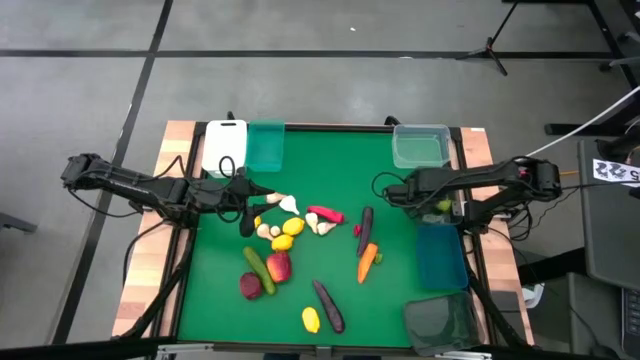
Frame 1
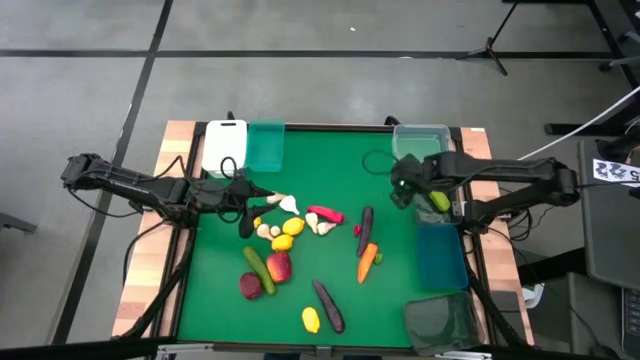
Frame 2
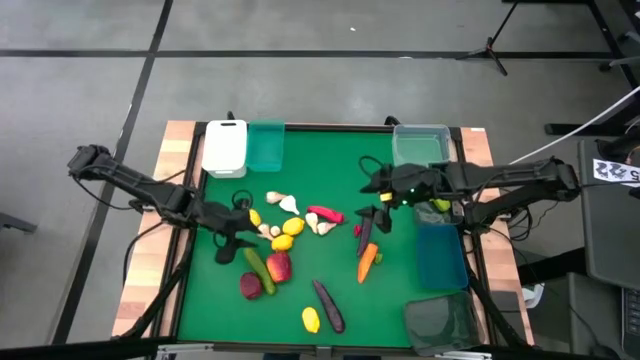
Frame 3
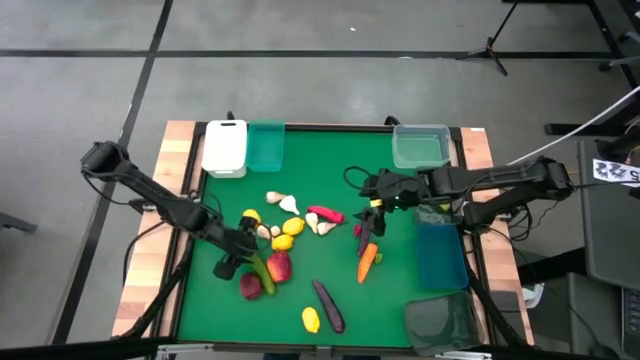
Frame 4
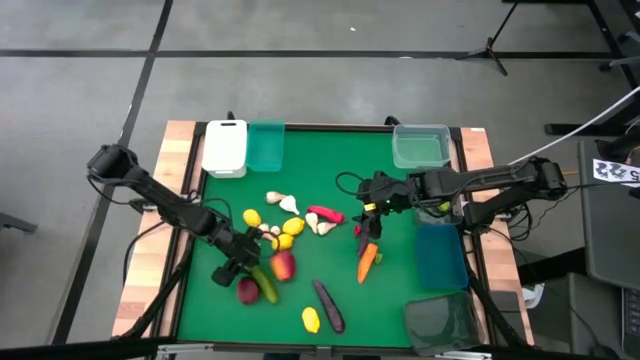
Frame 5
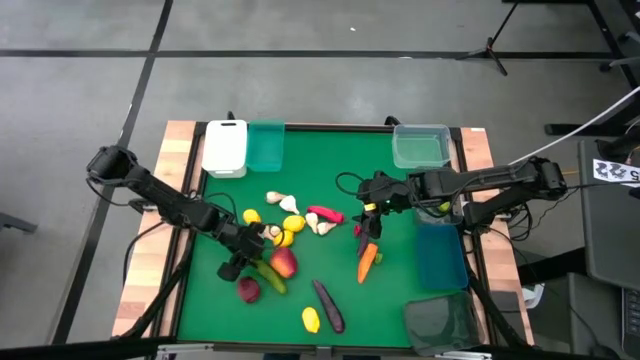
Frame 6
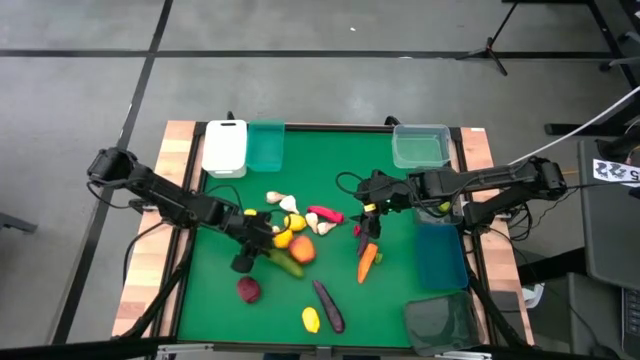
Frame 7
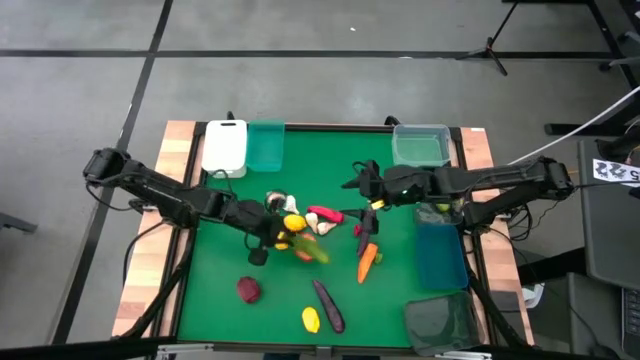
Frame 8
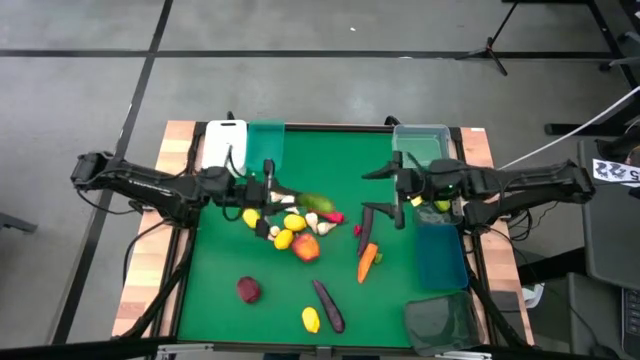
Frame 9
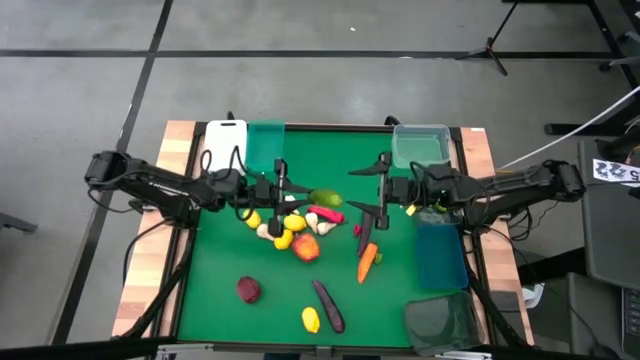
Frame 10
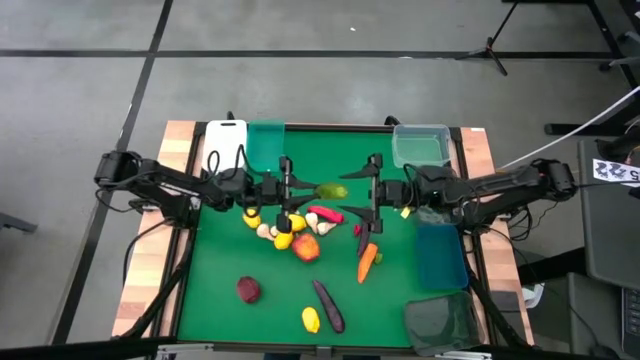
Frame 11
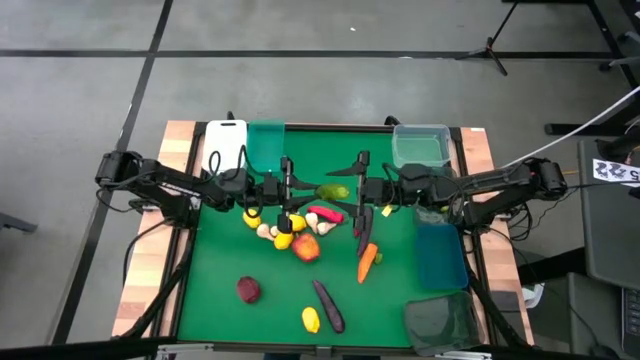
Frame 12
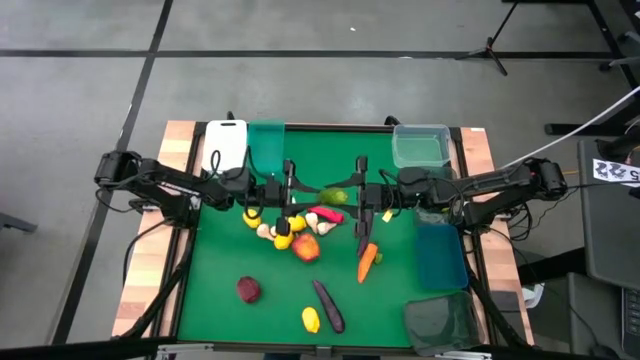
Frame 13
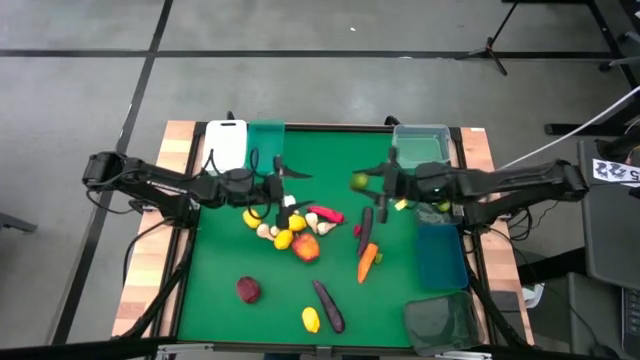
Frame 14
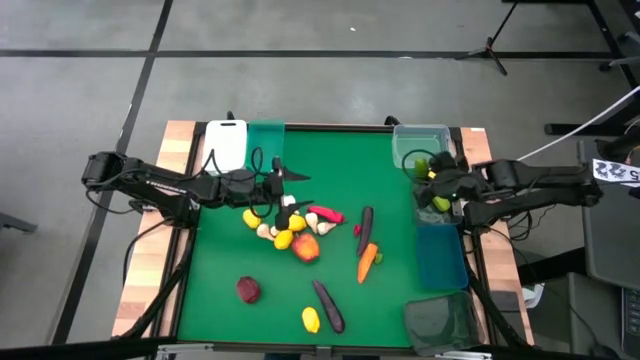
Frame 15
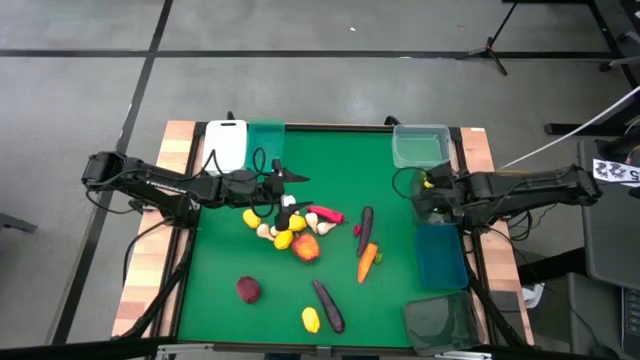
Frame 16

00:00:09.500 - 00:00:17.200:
Task: Sort produce into baskets
Put the green cucumber into the top black transparent bin

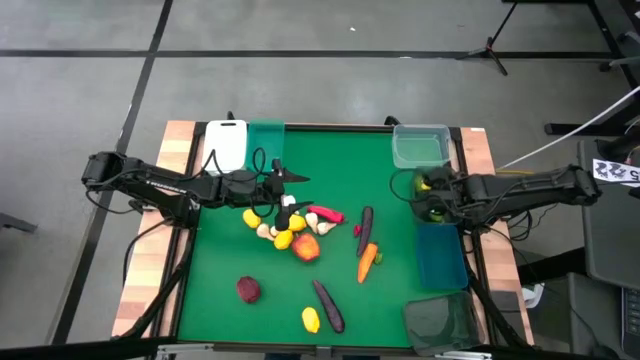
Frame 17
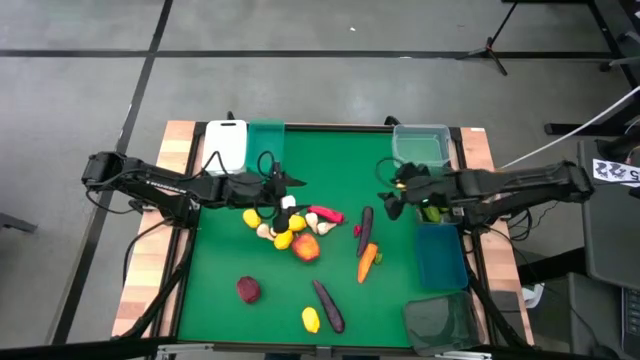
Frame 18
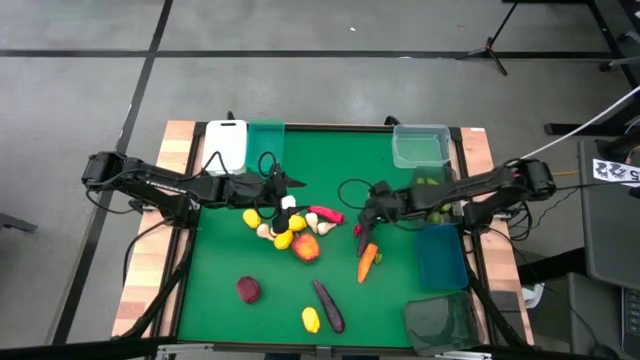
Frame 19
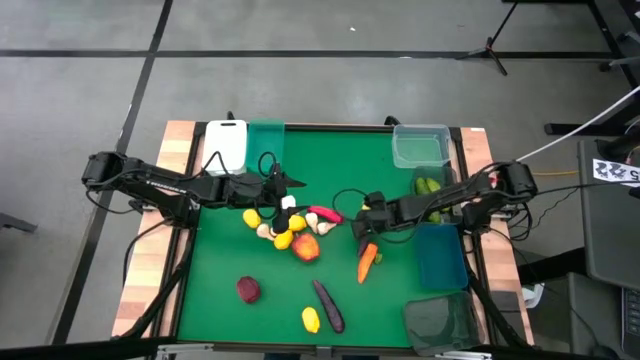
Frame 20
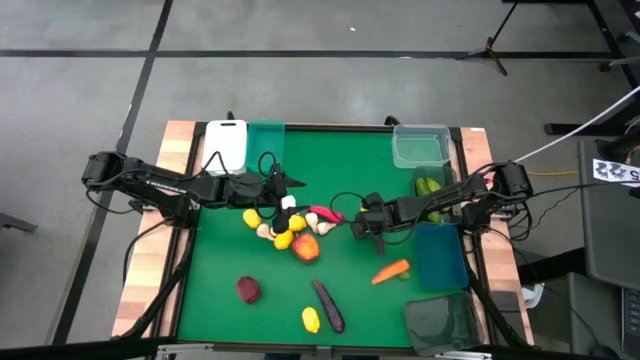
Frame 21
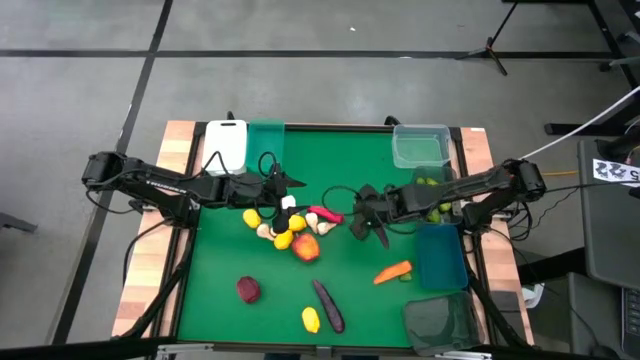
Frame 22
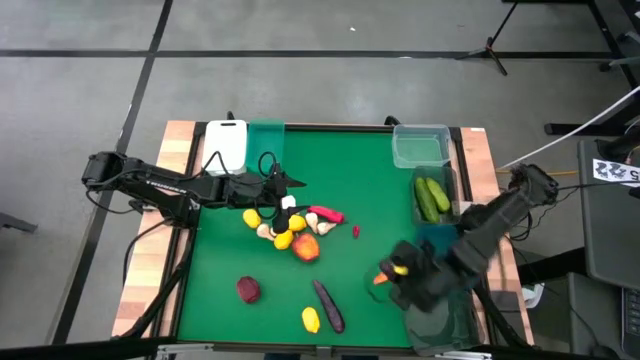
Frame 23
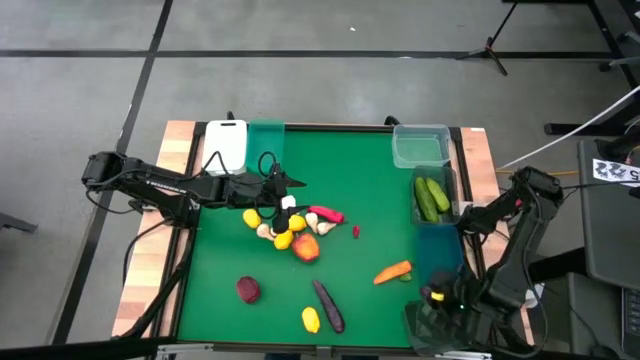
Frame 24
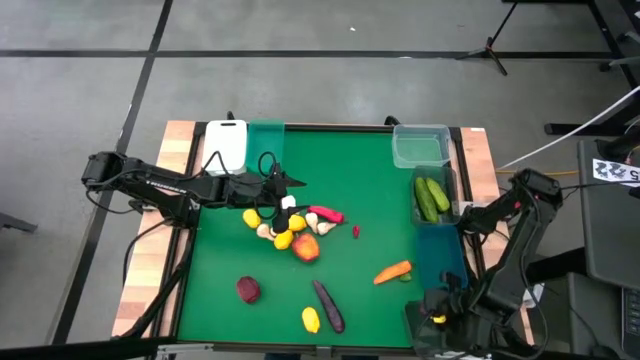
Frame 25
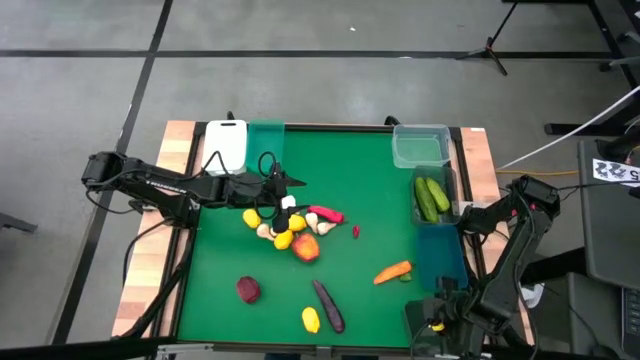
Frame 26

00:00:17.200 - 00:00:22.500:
Put the purple eggplant into the black transparent bin

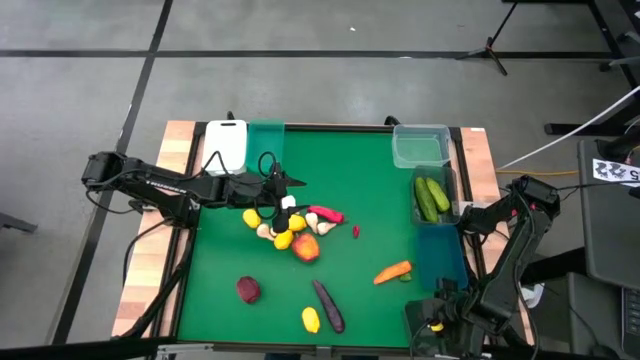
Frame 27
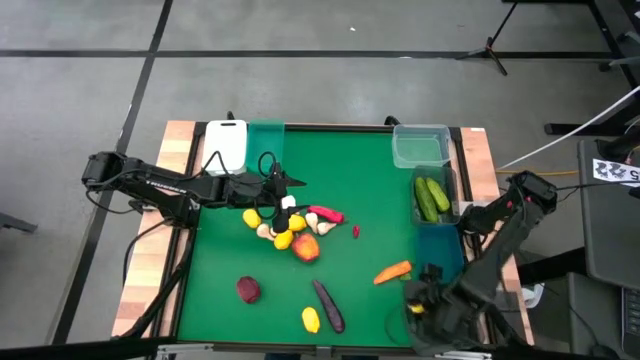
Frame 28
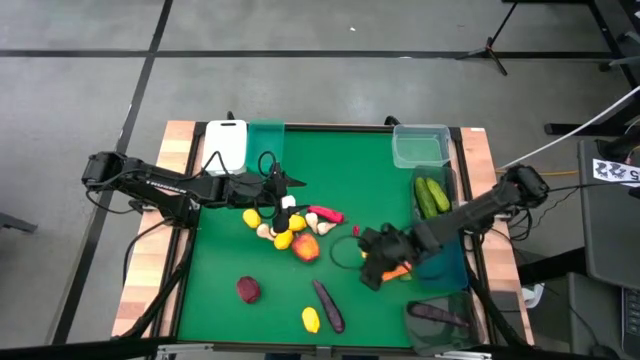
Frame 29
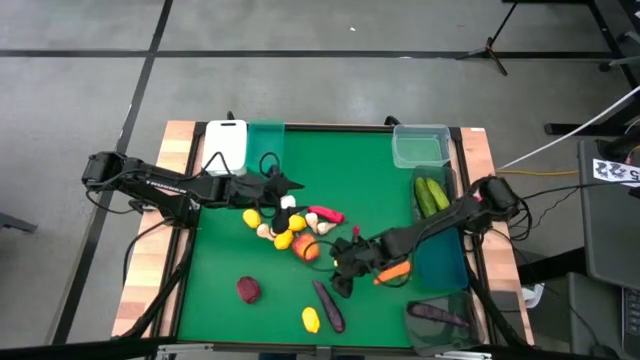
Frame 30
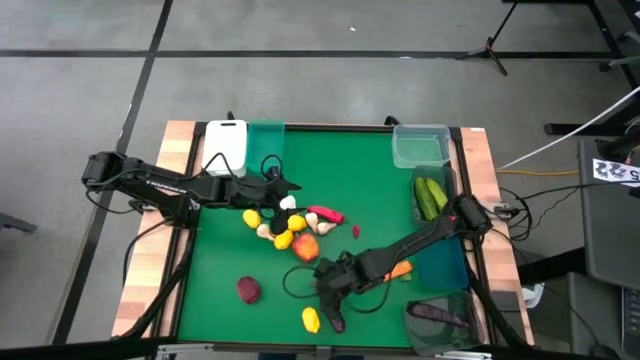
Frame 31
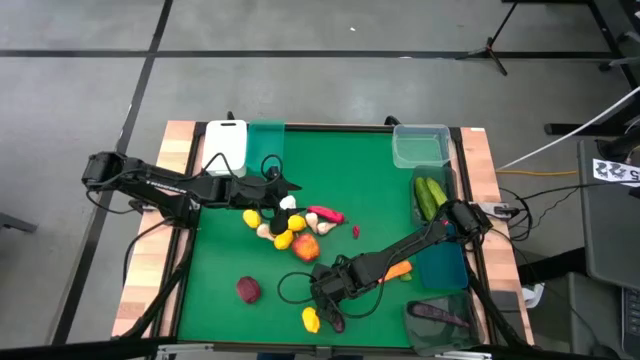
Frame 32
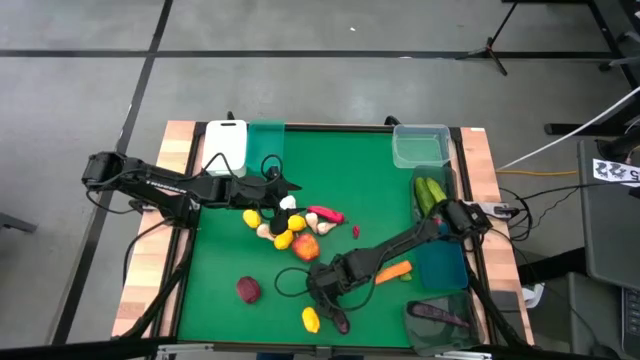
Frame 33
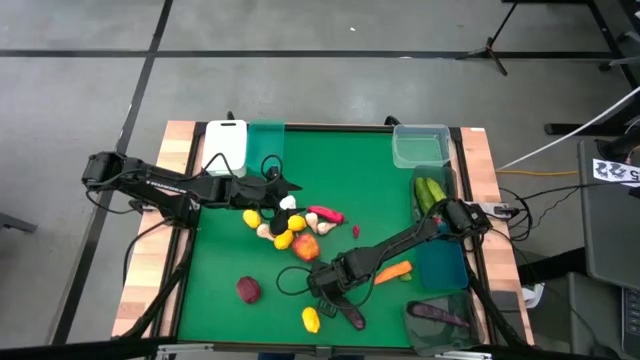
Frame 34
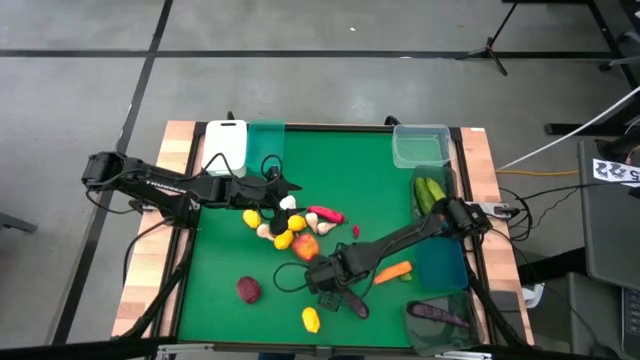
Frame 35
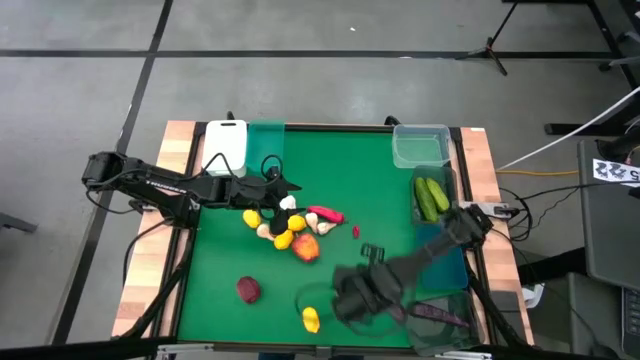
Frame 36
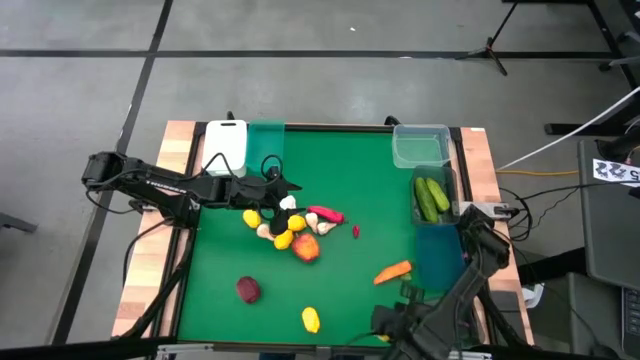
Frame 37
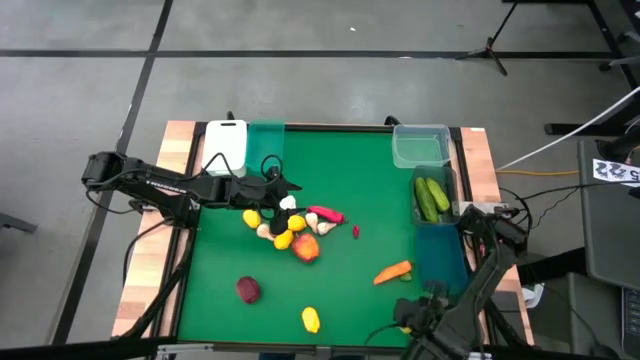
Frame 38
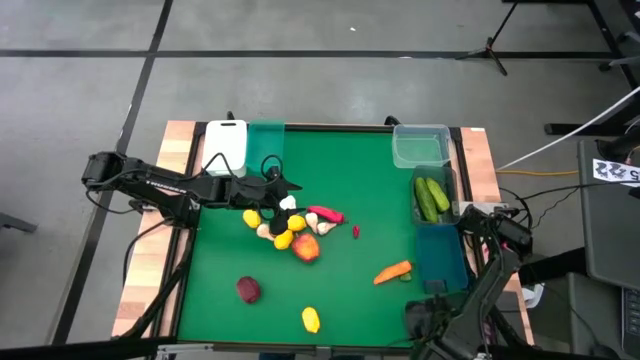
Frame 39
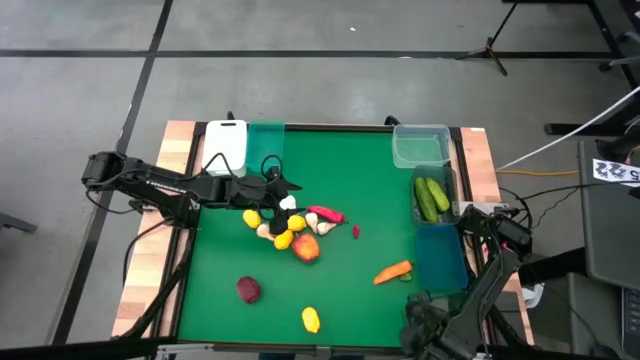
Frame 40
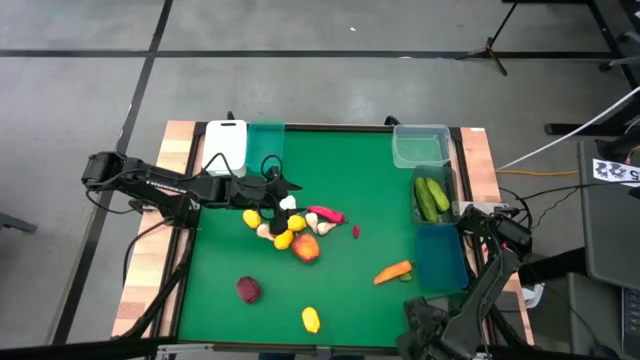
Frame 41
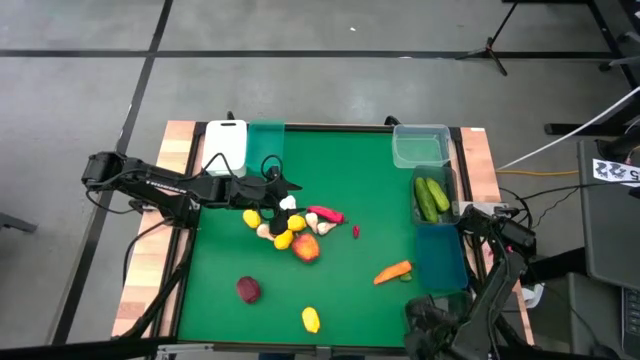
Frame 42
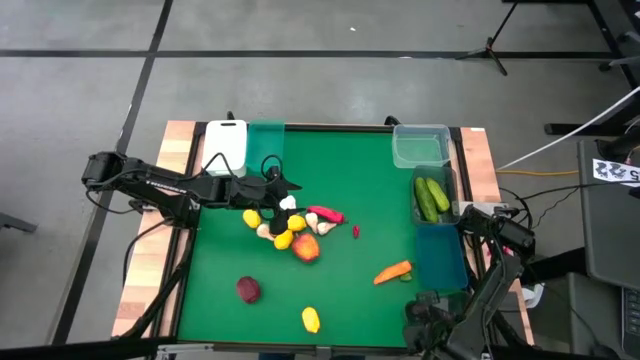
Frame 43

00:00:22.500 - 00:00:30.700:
Put the purple eggplant into the black transparent bin
